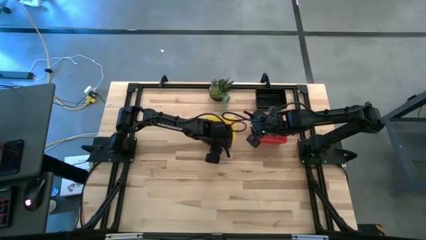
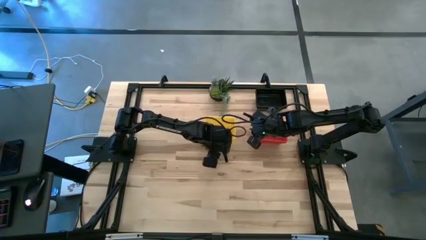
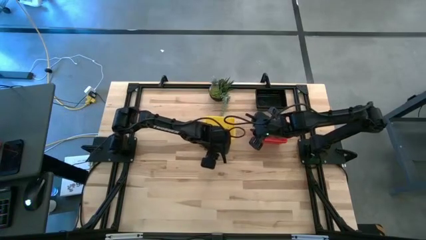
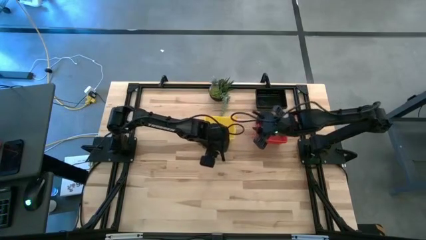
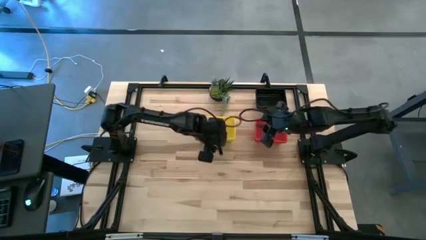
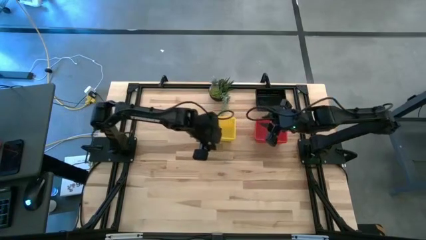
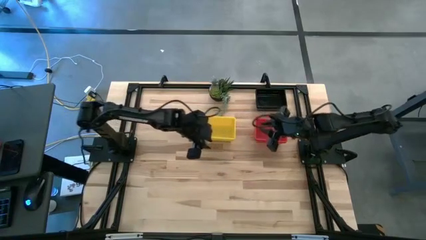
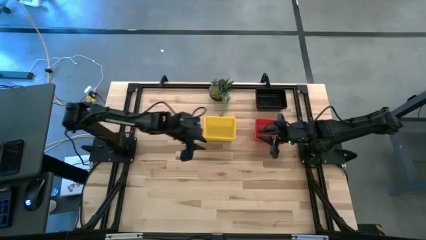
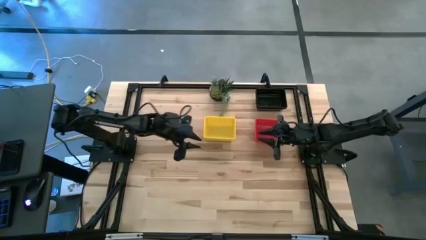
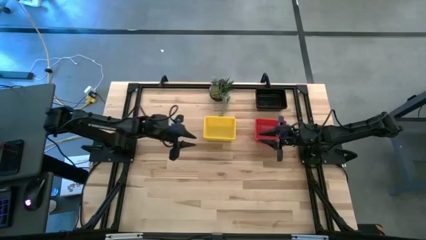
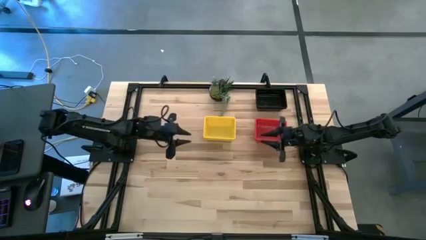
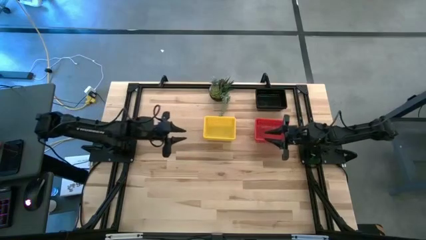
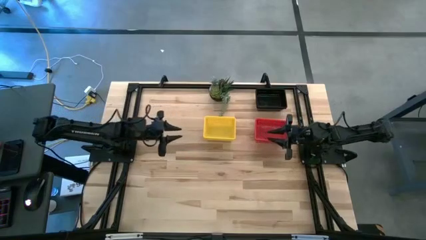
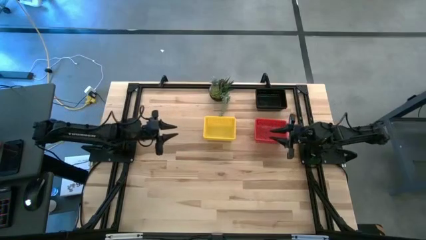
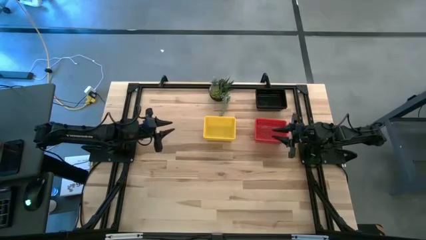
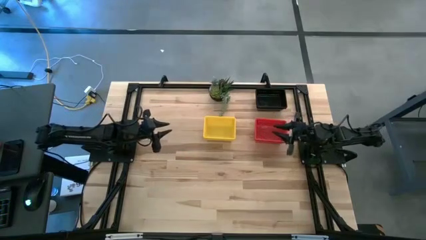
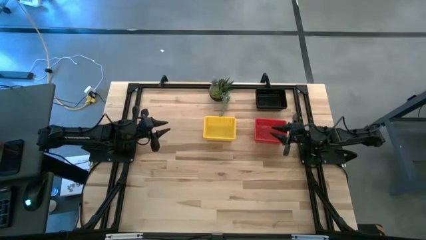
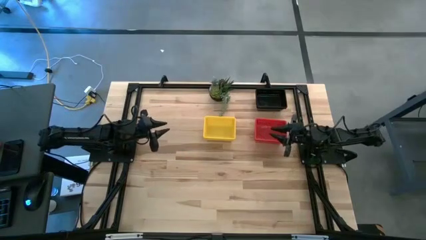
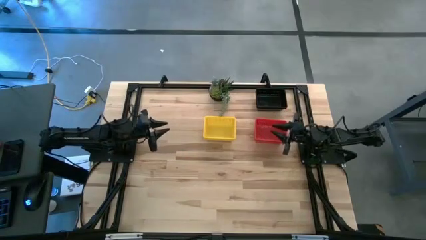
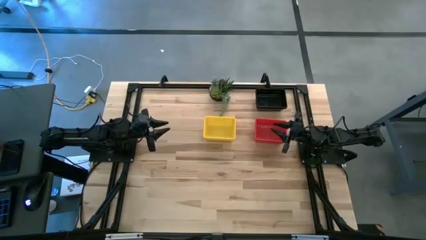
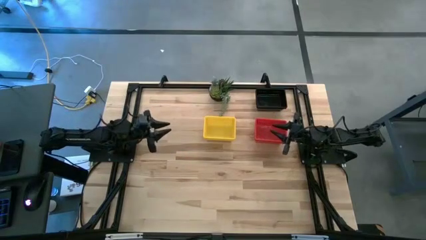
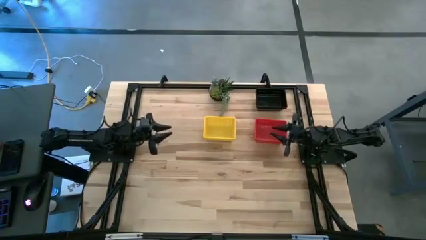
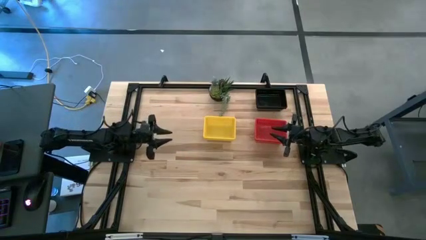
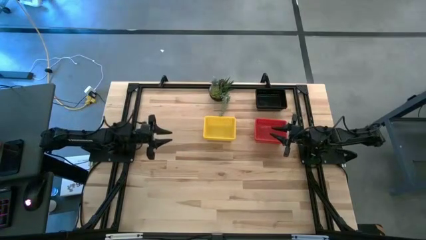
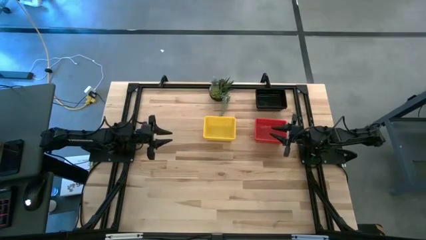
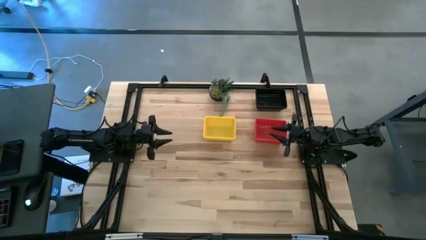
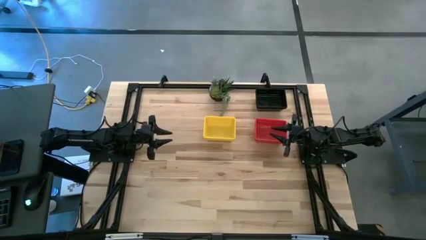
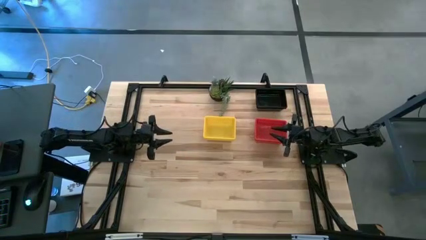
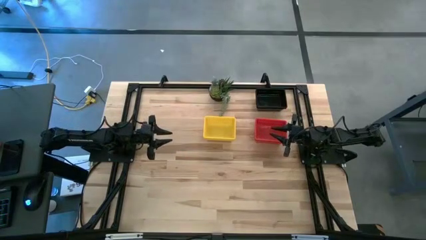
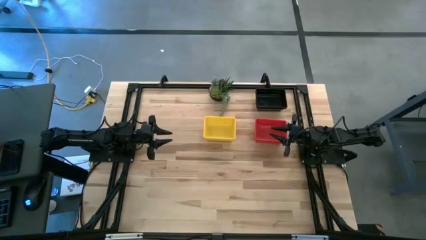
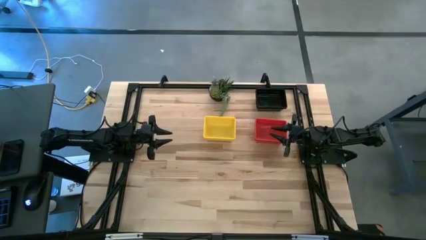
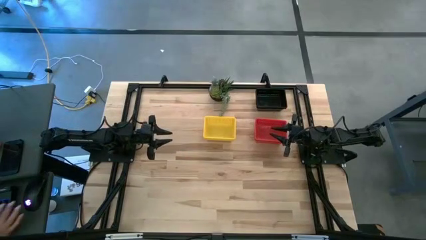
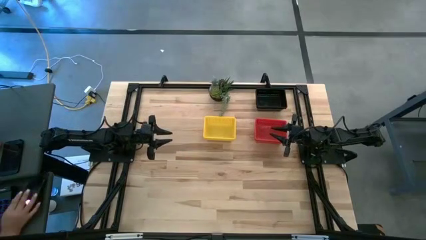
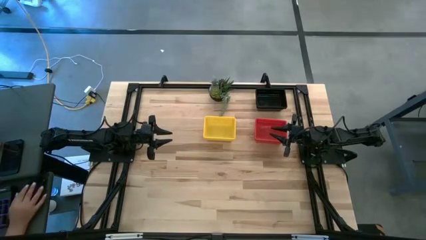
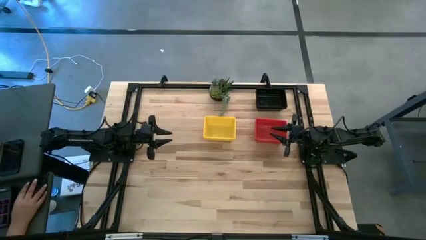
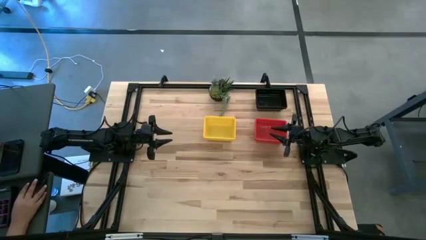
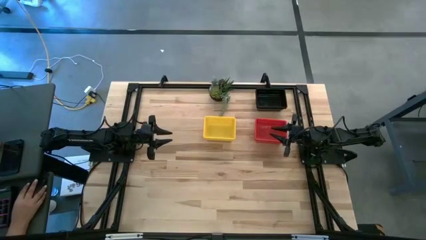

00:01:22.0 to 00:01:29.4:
Return to Home Position

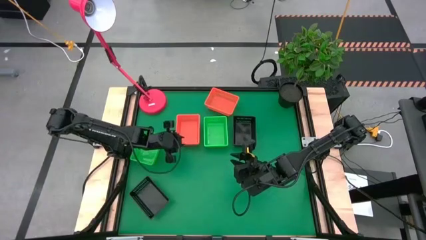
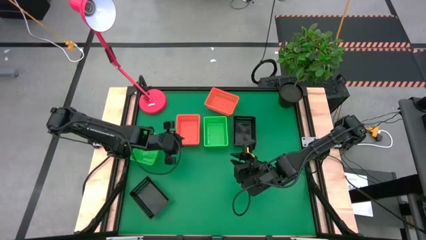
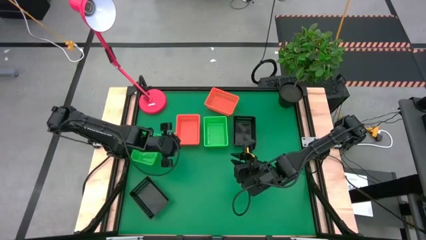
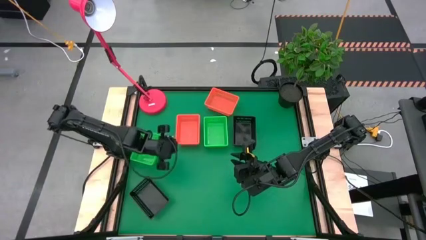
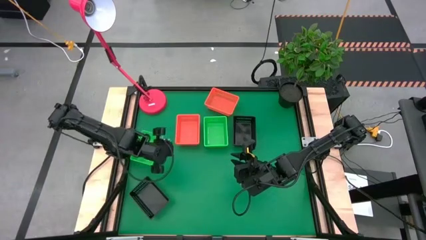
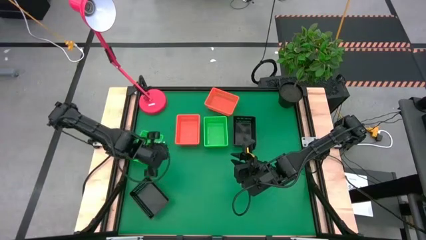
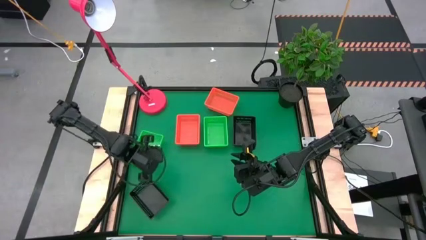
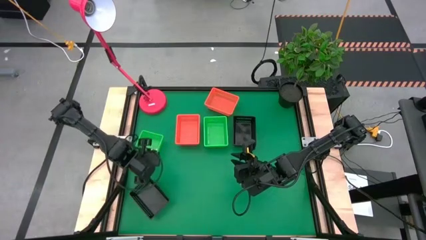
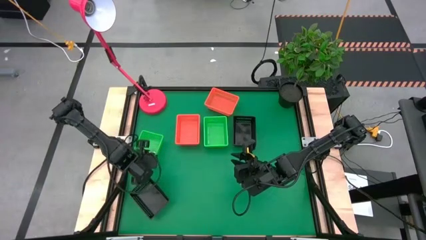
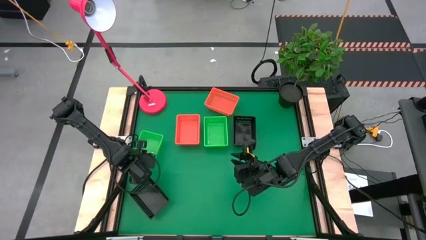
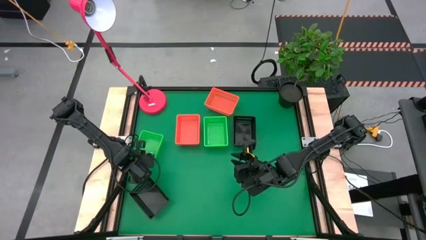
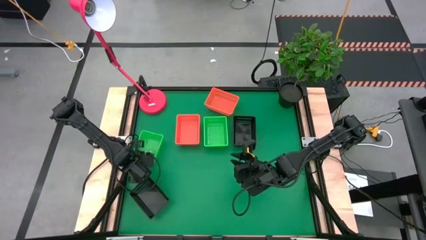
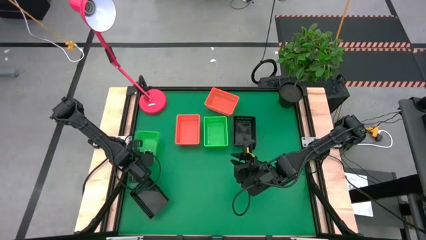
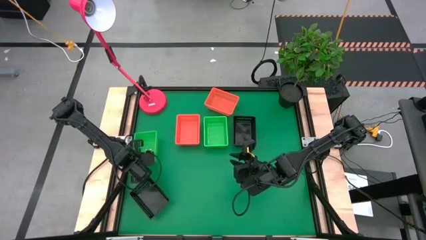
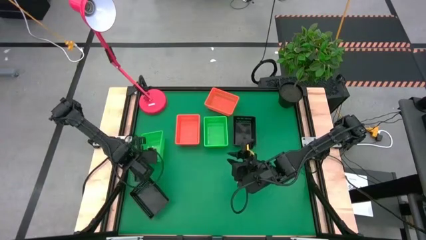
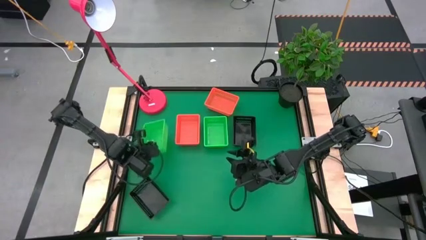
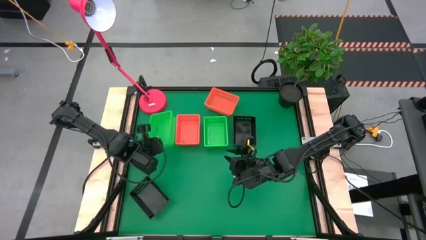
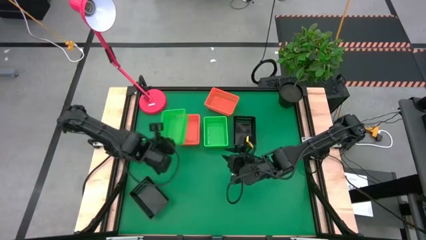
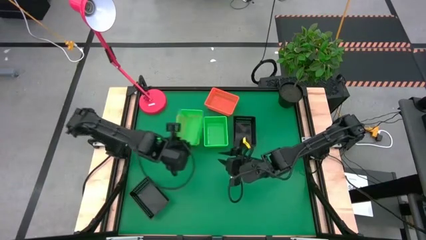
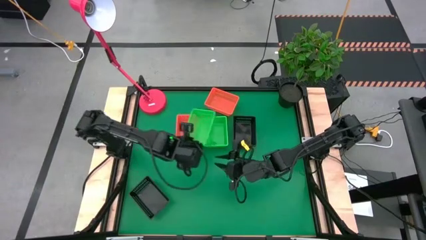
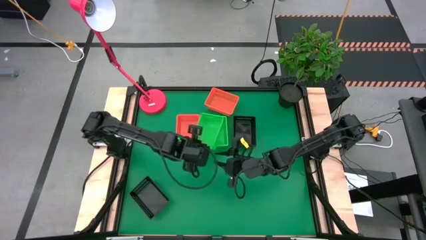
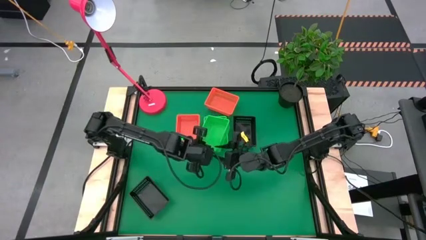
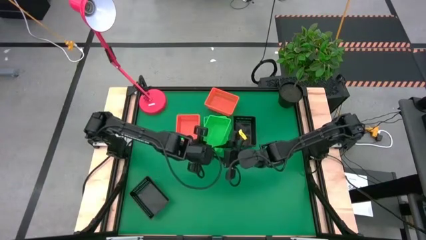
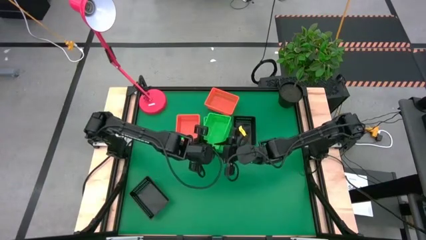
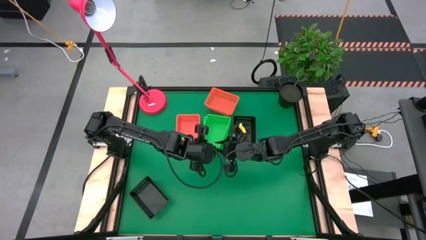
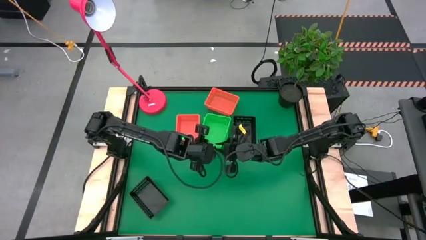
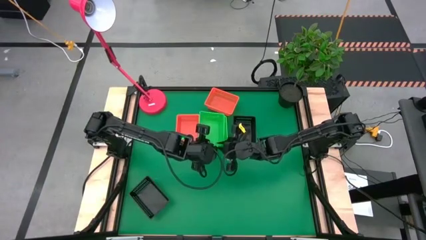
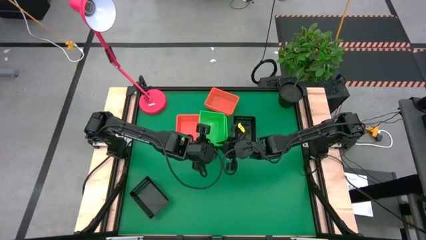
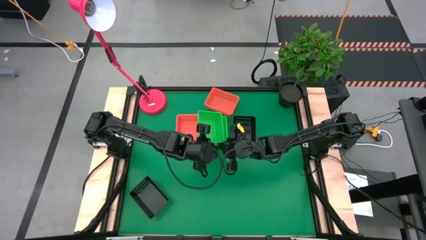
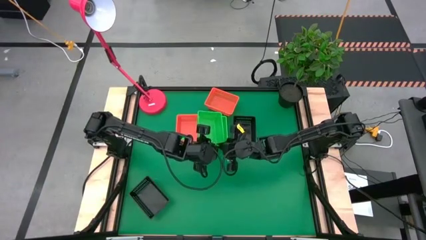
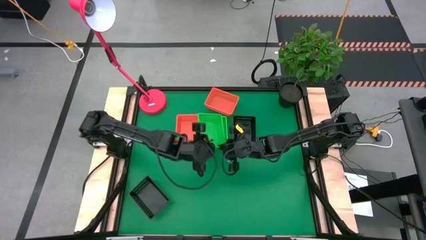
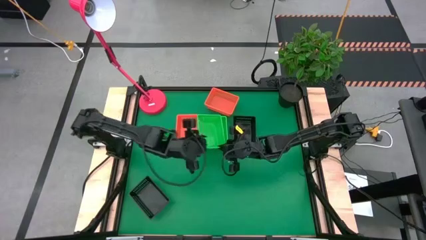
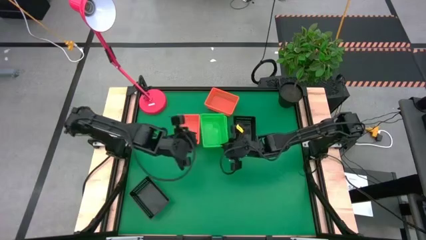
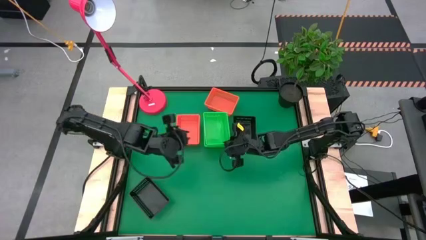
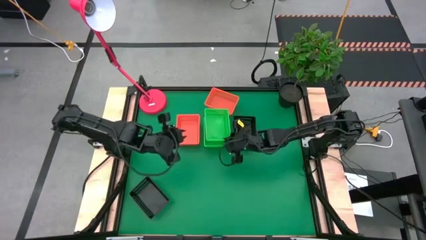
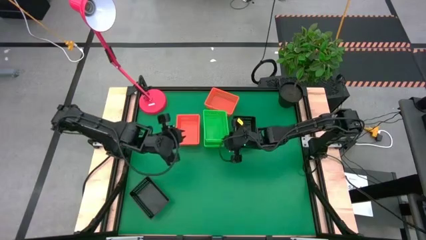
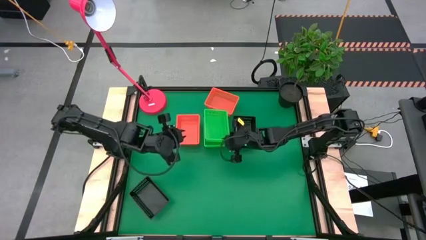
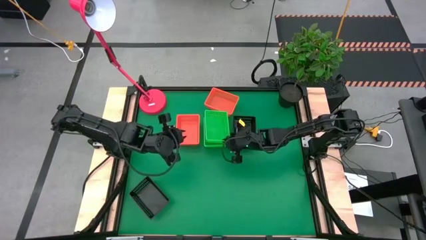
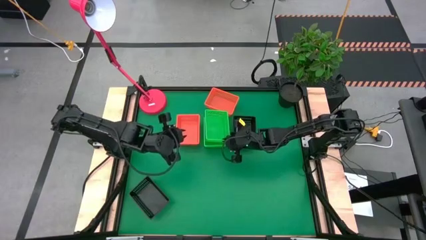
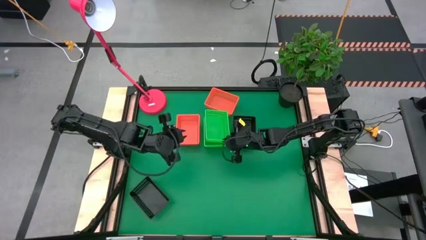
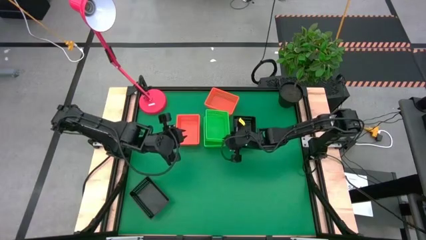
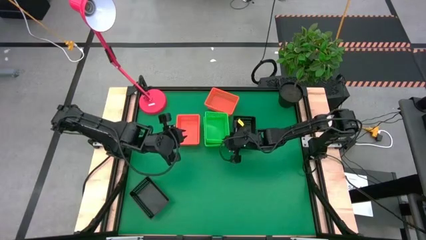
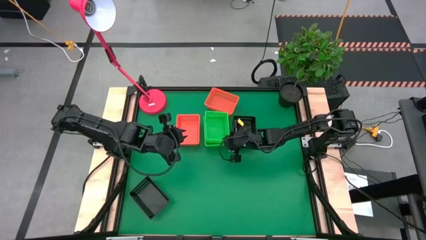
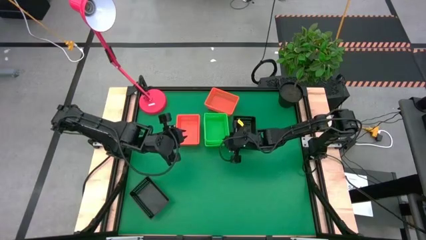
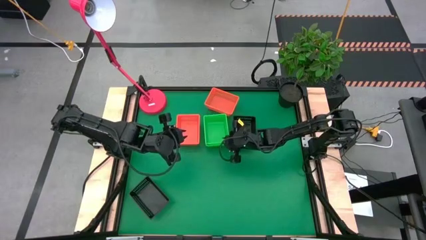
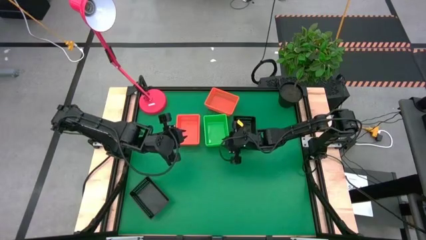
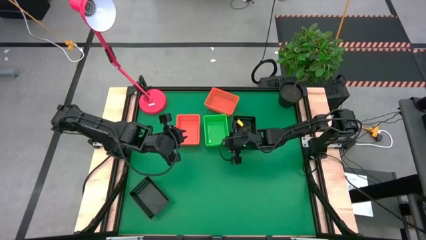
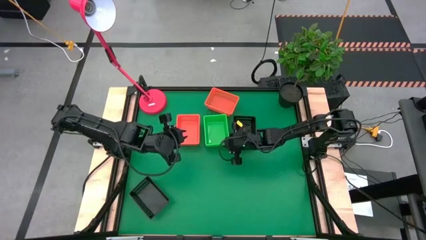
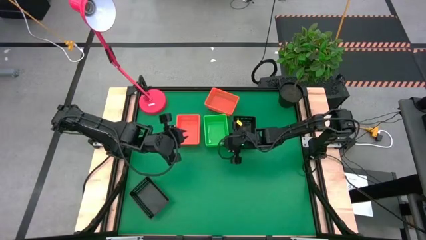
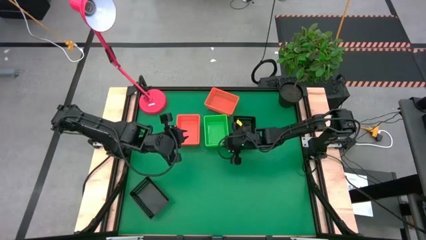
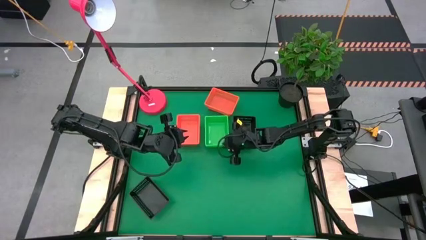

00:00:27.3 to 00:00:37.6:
Stack the left green basket on top of the other right stacked green baskets
